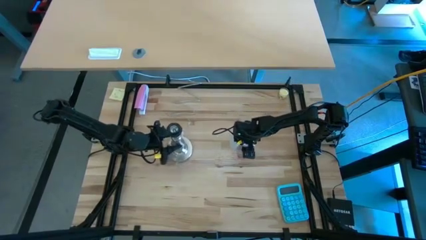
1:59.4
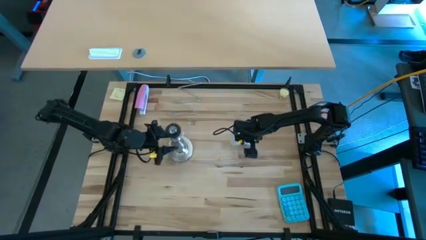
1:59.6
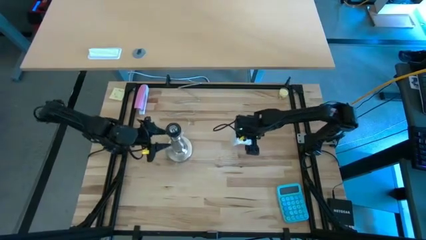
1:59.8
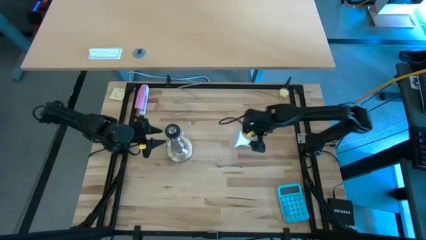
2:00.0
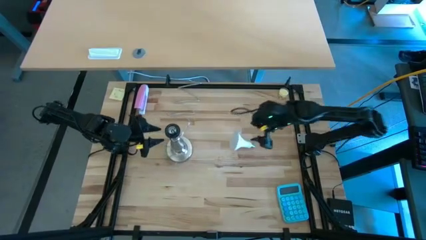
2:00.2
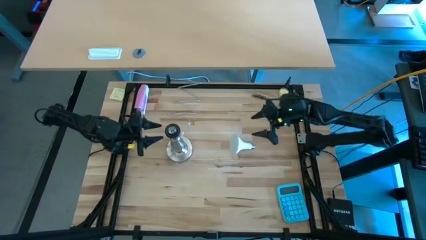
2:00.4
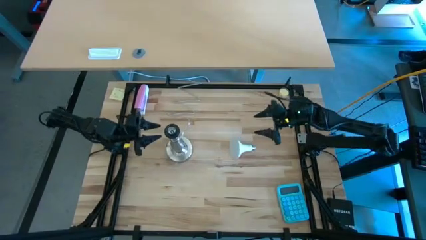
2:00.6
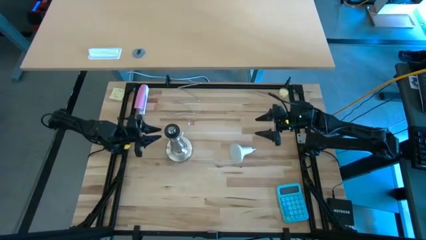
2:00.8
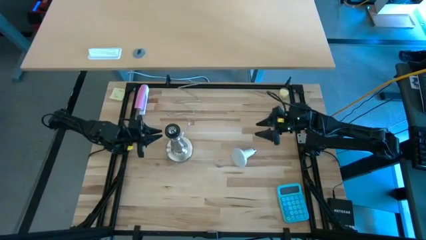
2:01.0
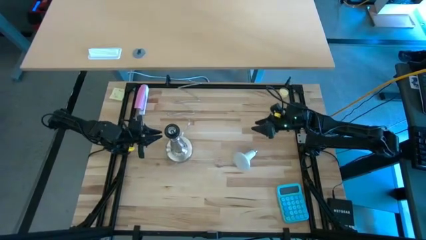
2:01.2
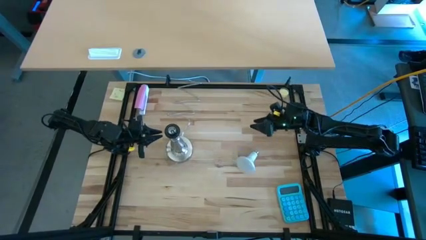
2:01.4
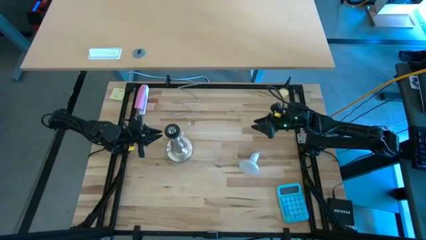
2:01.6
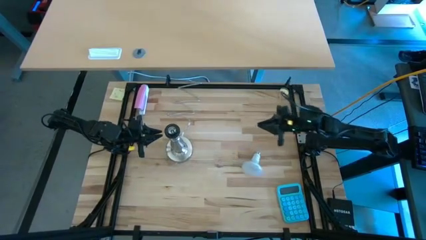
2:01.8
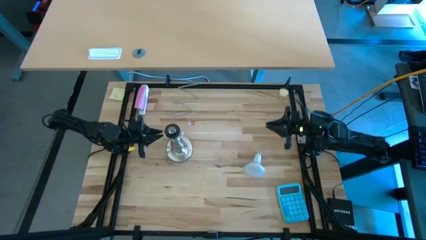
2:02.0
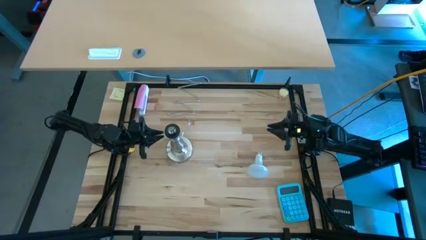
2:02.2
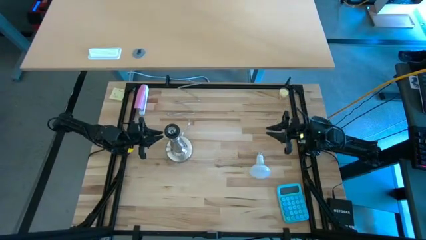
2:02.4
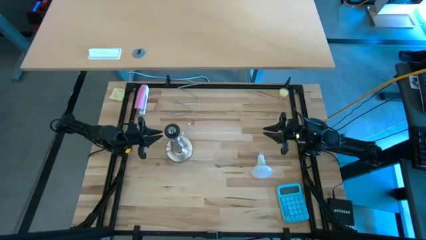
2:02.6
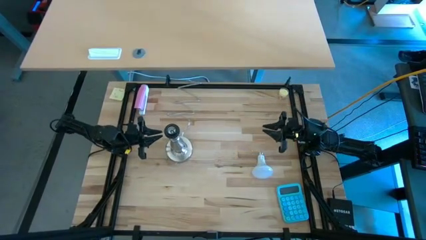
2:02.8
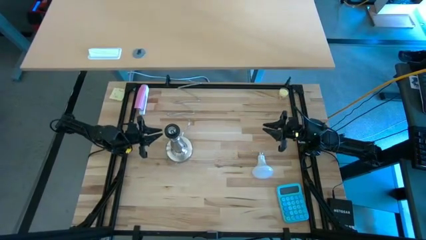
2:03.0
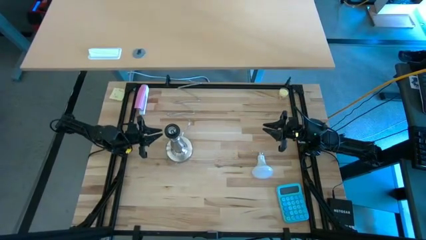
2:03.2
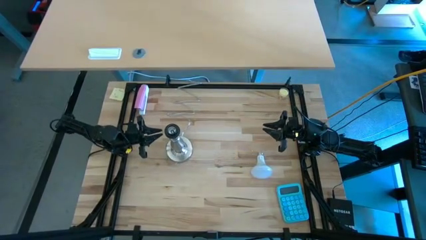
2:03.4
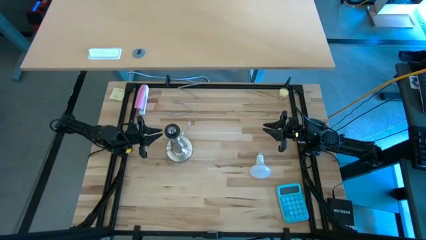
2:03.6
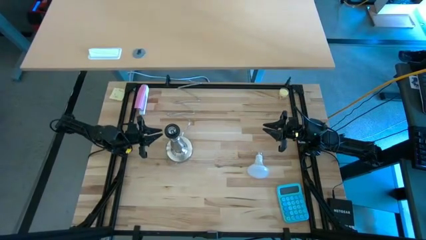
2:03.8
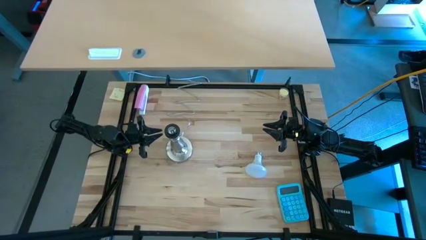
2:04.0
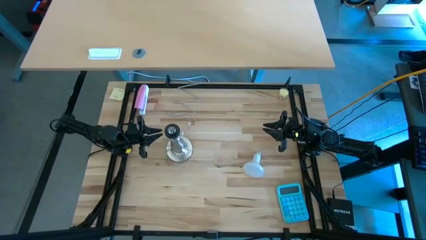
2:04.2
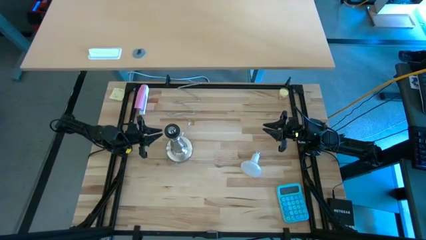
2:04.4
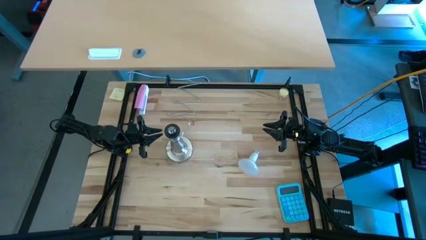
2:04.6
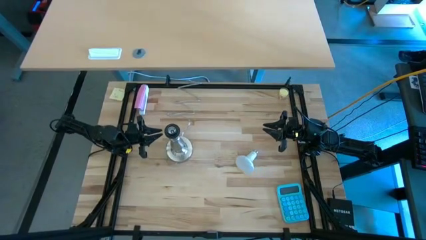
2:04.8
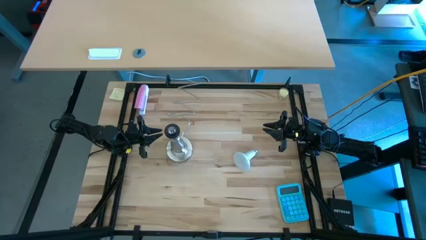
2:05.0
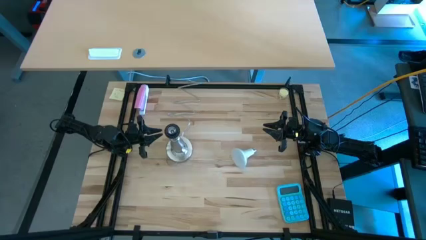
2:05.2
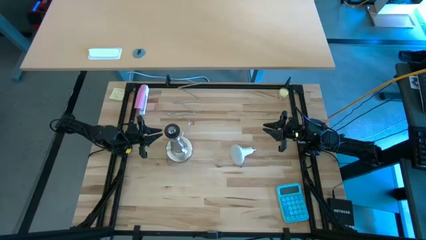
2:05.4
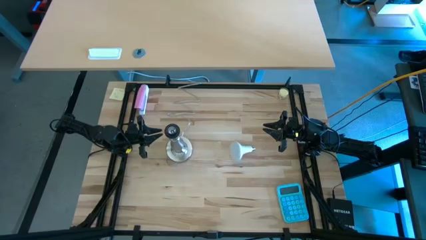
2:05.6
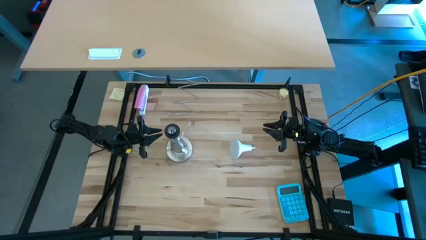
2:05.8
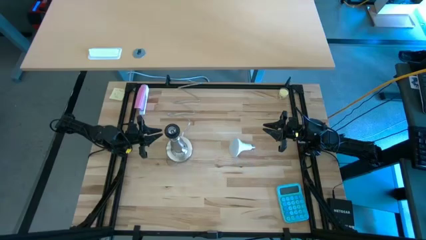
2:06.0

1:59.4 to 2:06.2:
Task: Screw lightbulb
Return to Home Position

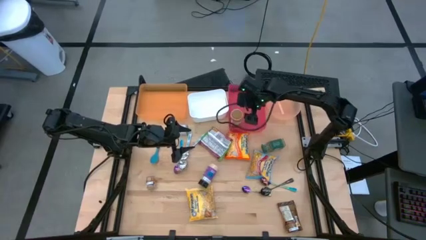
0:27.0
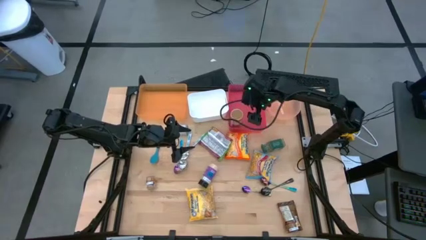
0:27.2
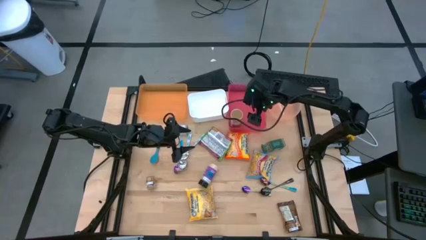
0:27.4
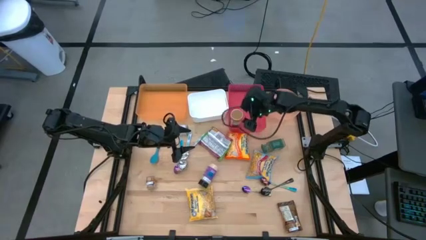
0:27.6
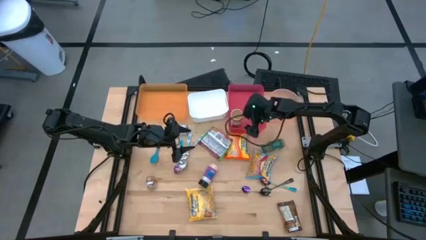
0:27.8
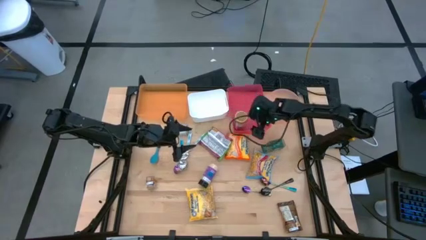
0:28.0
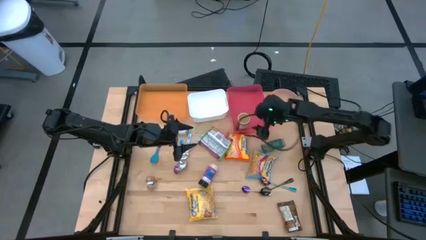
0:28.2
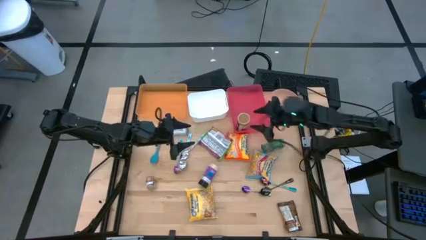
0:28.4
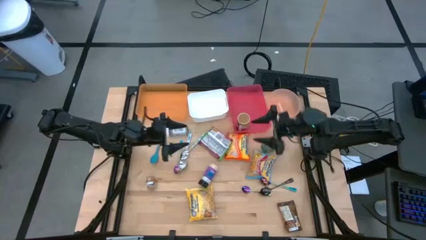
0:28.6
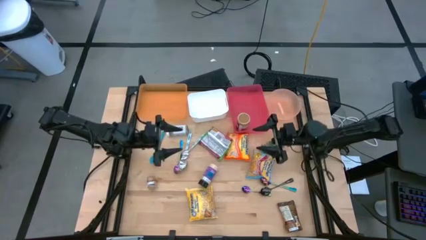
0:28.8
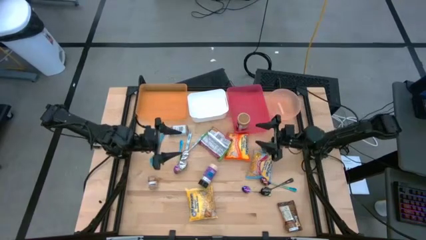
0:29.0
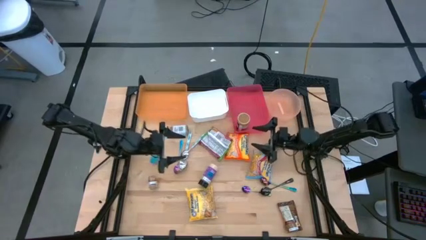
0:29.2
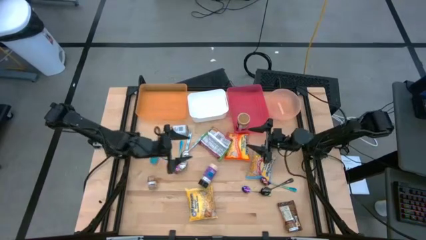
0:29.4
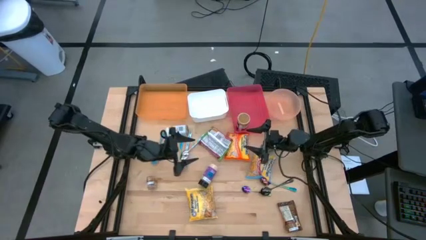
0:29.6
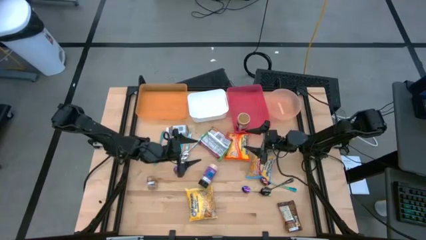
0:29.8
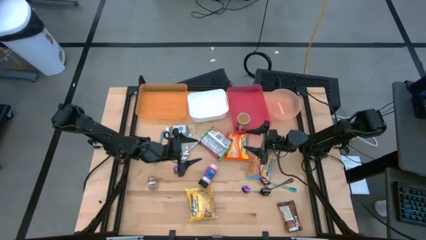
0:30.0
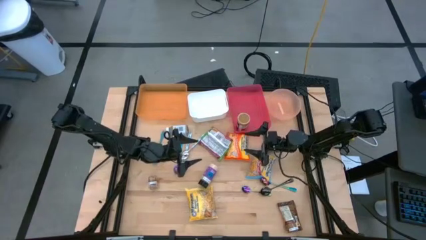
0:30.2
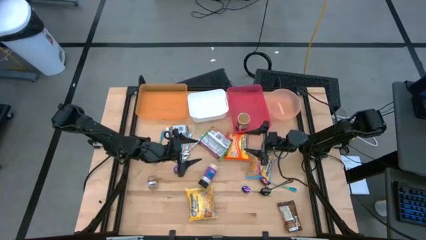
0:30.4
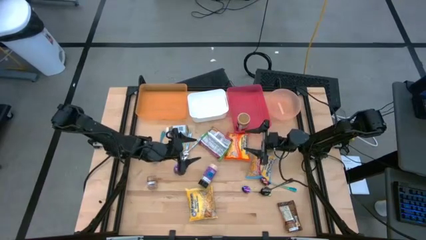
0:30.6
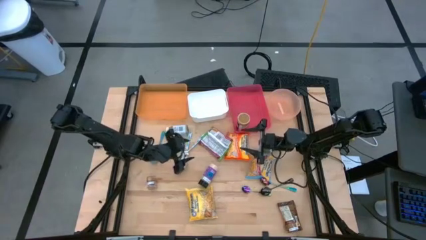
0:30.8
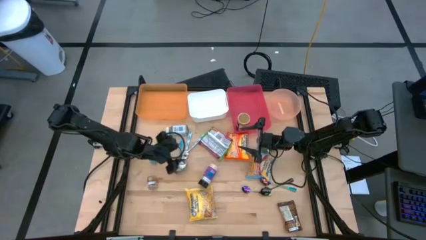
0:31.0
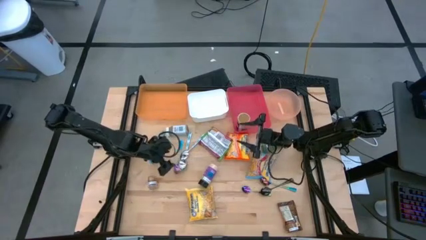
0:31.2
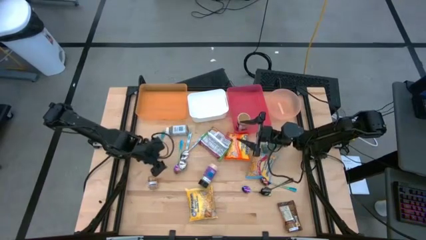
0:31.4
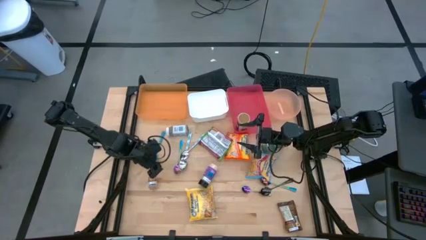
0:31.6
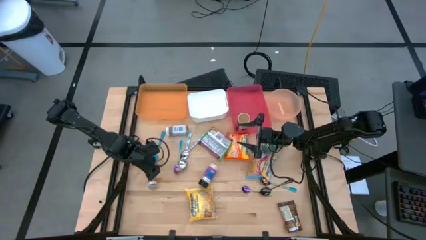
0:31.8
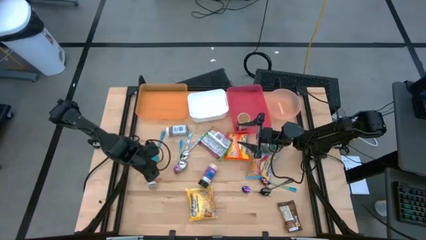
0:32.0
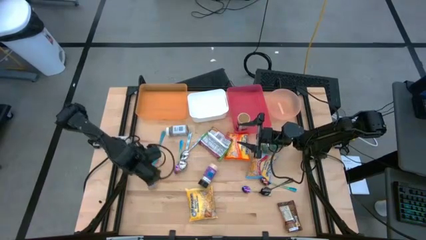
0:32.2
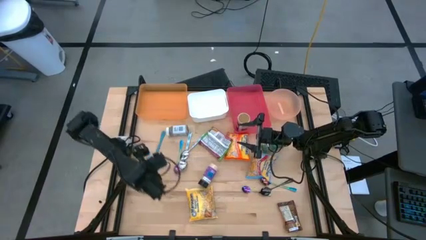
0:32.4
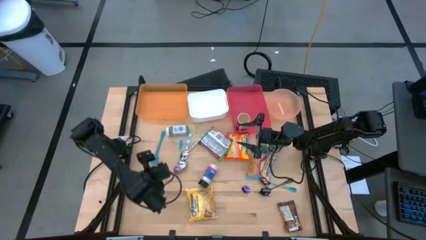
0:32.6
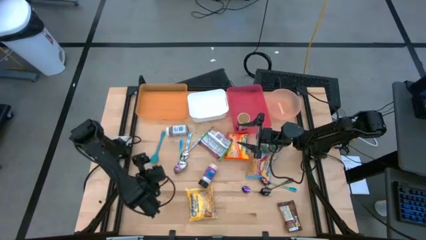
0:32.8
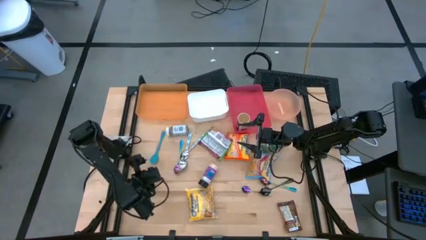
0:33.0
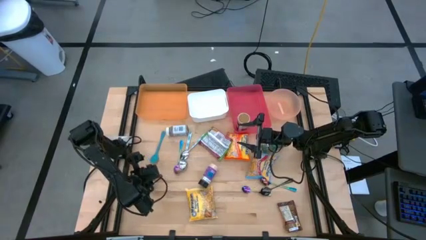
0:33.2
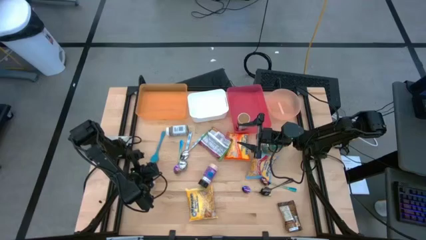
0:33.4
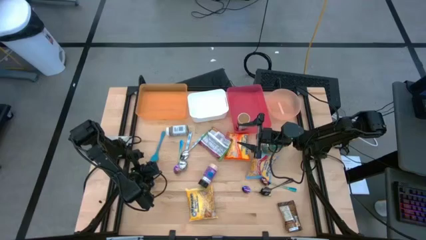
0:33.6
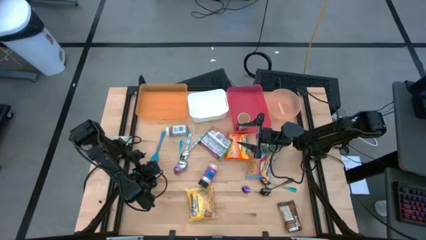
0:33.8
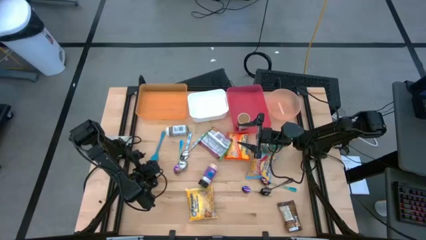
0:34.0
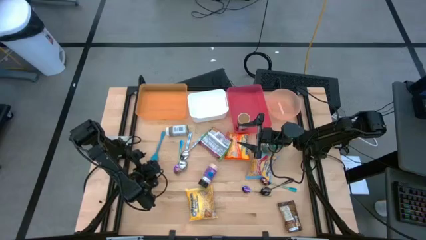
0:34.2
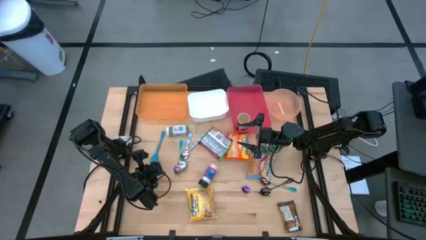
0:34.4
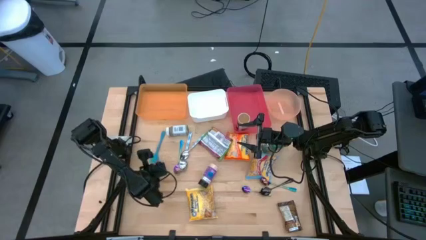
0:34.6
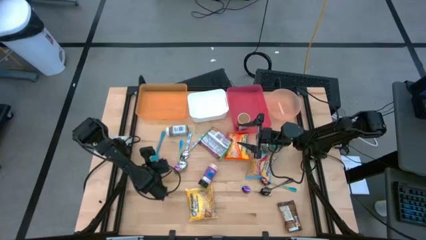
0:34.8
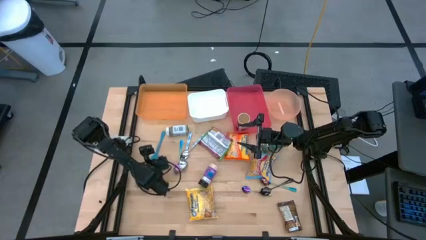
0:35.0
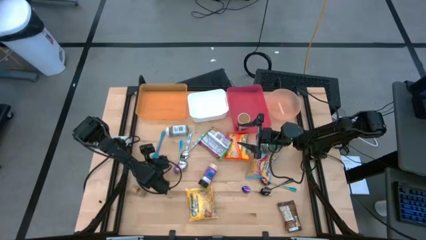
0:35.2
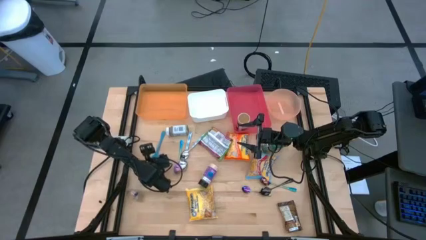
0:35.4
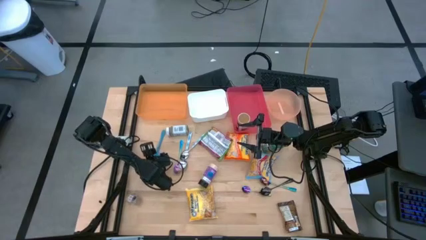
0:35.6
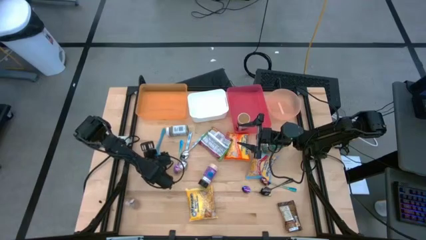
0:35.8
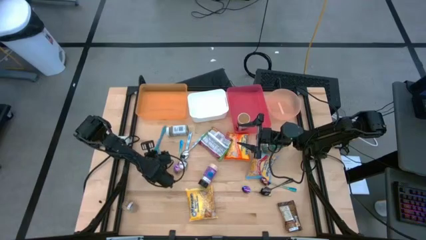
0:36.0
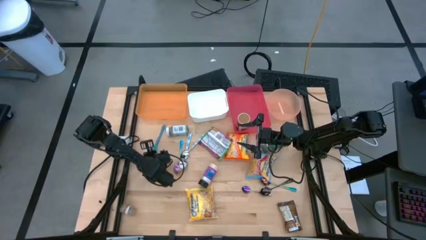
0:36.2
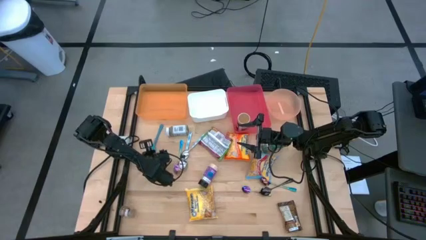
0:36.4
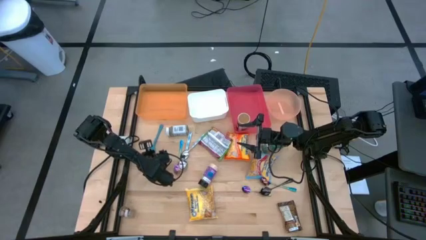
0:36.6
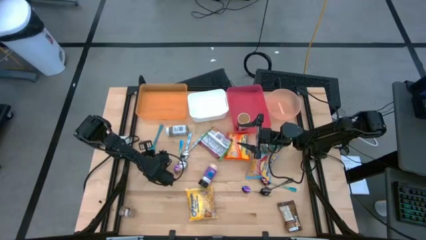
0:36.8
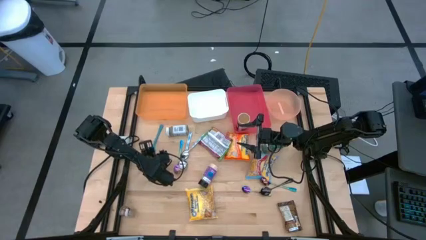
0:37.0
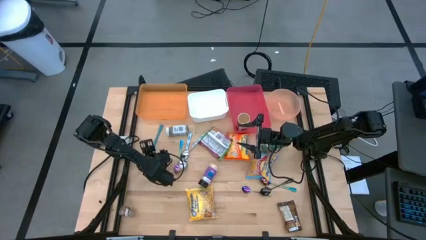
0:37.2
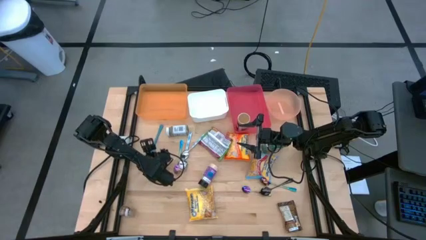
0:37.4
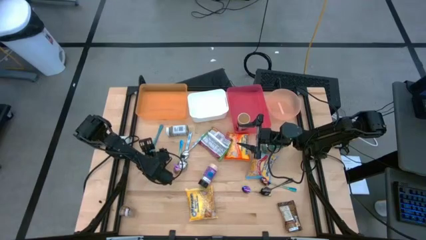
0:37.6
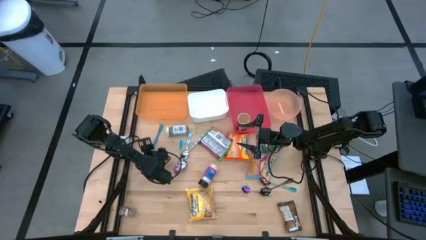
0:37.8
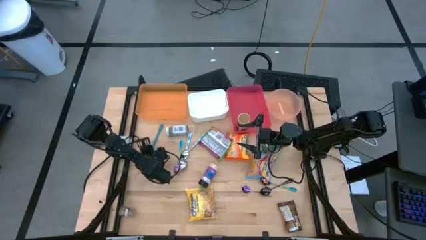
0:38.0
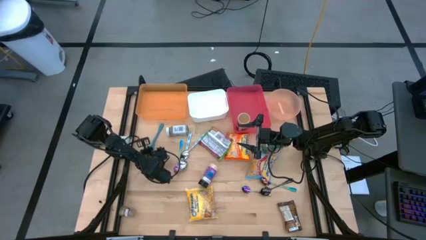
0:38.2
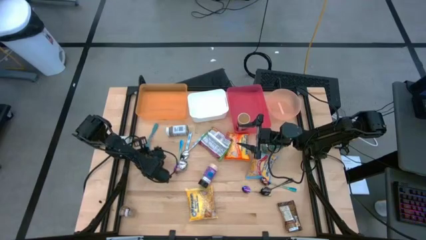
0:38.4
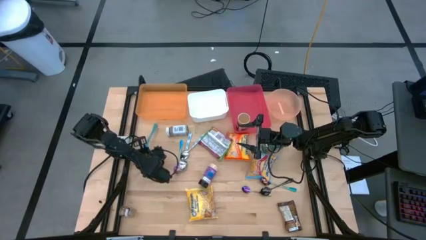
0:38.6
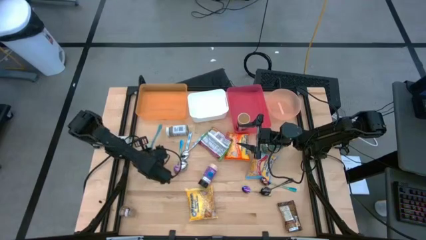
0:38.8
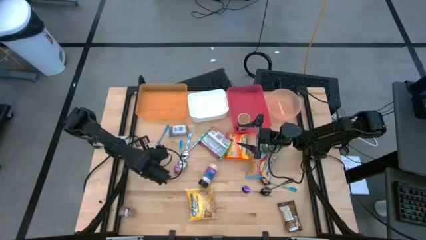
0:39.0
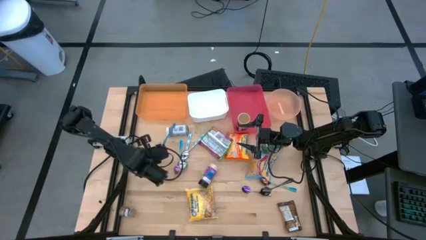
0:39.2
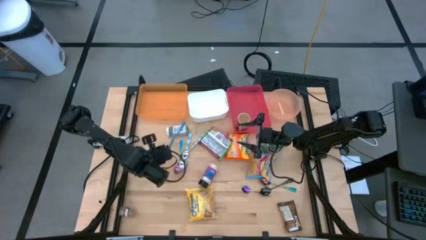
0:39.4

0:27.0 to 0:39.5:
Task: Pick & Place Food Item
Put the blue baby spoon into the orange bin
